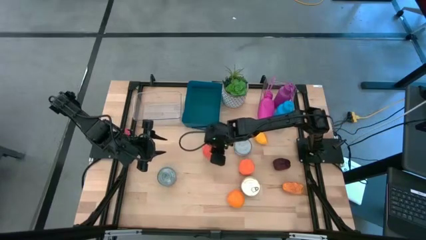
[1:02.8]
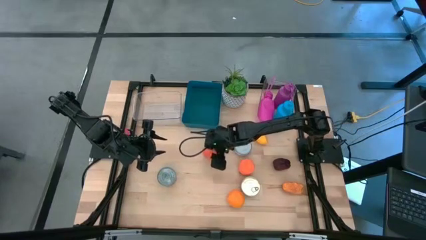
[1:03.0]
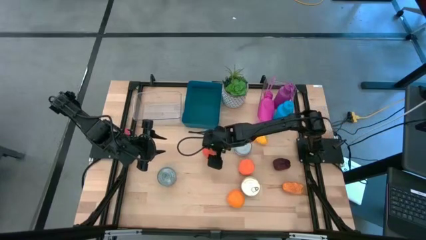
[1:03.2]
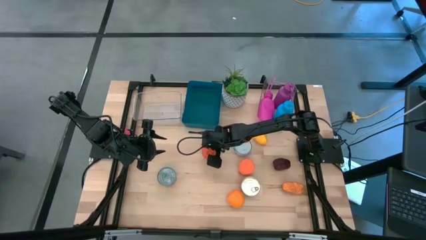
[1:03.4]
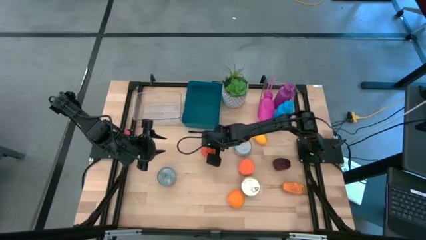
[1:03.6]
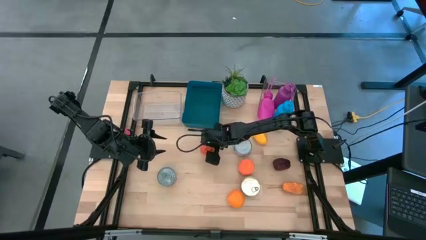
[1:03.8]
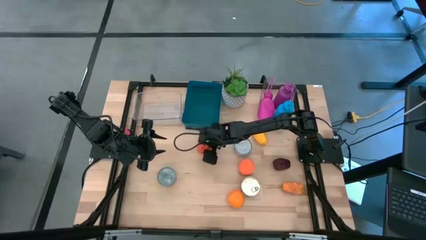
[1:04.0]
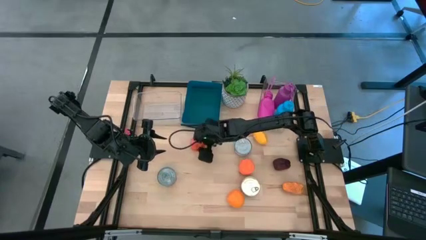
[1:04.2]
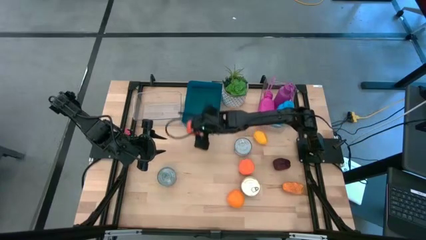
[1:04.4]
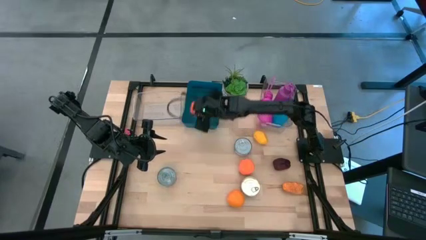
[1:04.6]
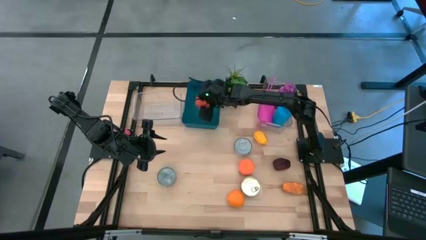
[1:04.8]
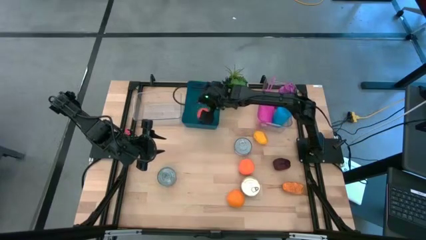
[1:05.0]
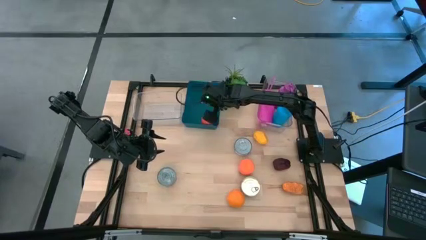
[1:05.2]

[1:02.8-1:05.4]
Task: Pick & Place Food Item
Put the top orange into the blue bin

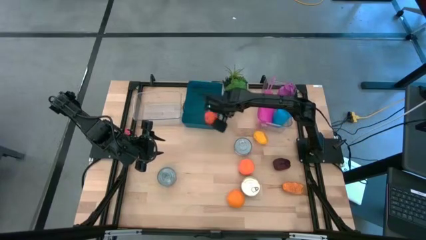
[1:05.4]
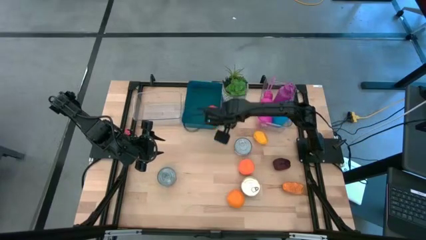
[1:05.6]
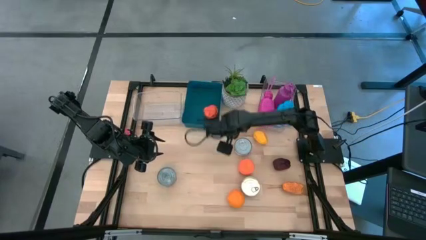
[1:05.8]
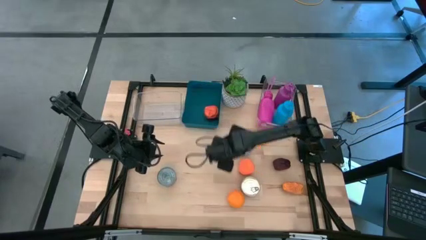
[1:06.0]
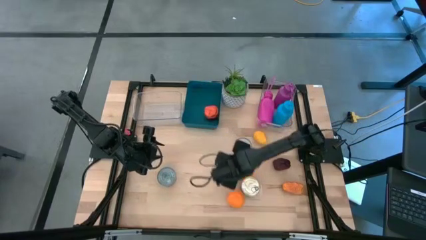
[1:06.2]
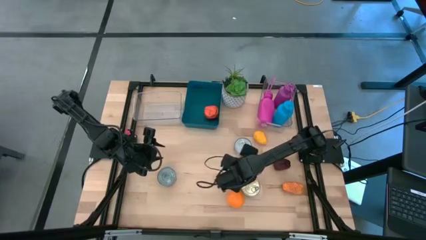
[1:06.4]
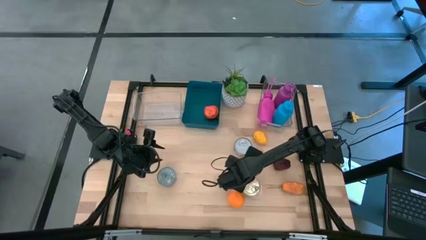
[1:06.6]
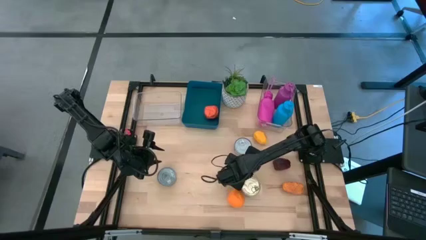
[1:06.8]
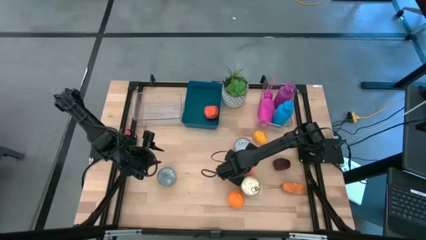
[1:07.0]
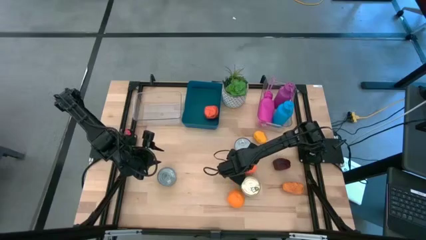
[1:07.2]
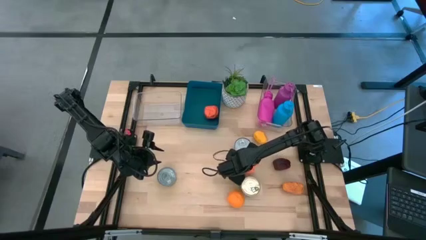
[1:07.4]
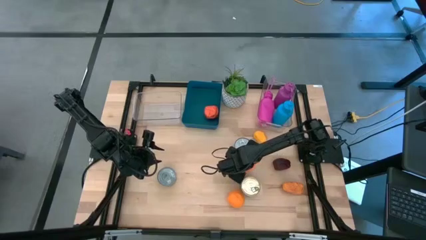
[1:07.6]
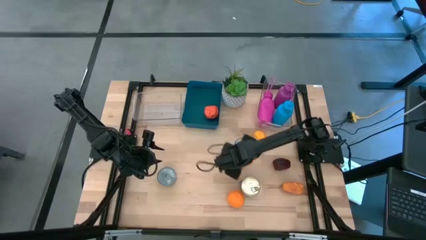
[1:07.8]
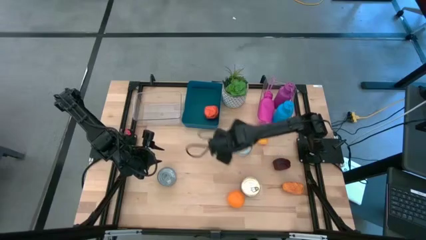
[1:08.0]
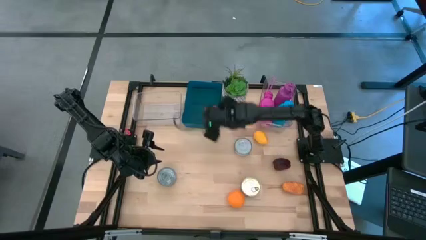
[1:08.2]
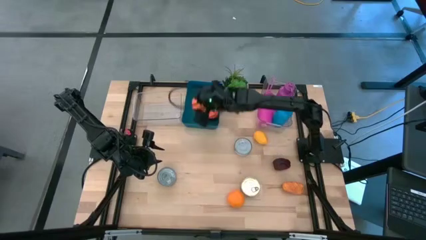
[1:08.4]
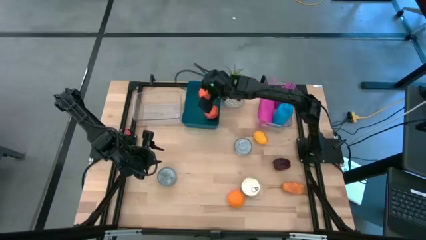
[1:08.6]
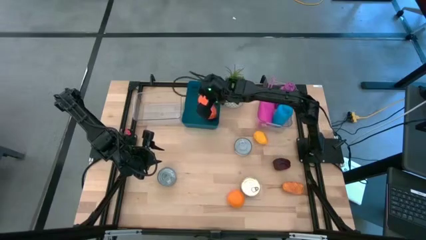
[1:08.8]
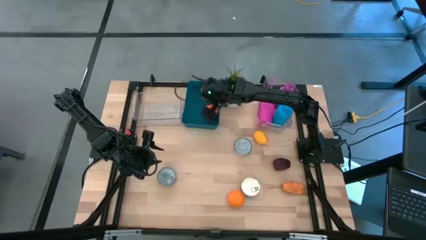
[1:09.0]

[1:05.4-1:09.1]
Put the top orange into the blue bin

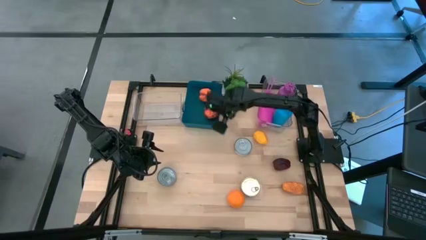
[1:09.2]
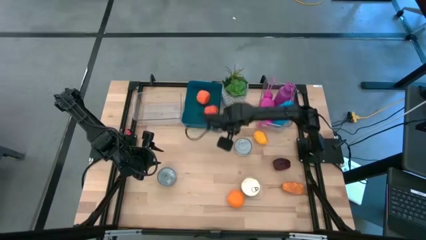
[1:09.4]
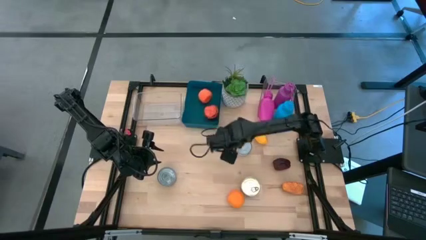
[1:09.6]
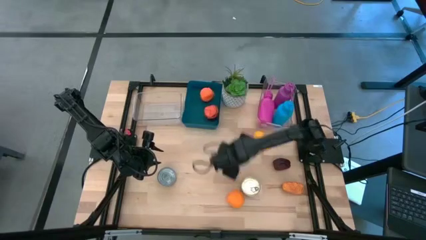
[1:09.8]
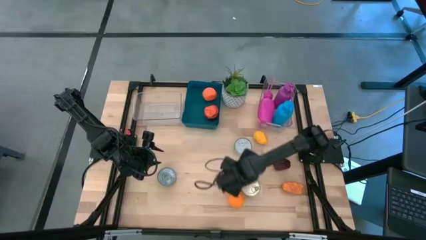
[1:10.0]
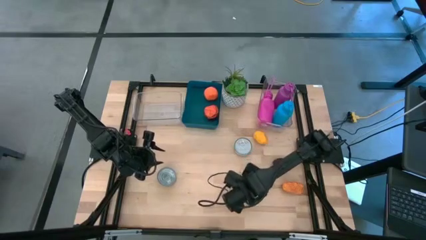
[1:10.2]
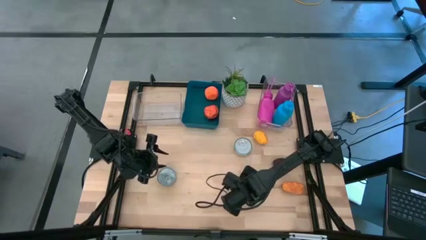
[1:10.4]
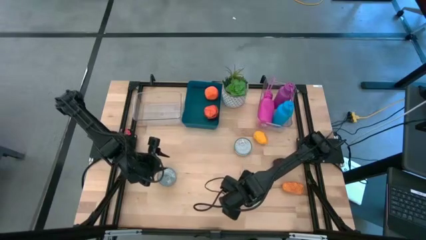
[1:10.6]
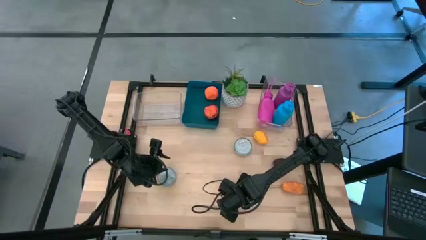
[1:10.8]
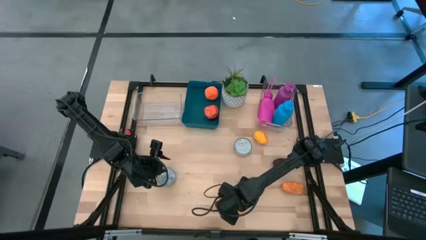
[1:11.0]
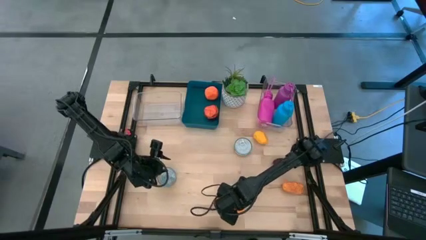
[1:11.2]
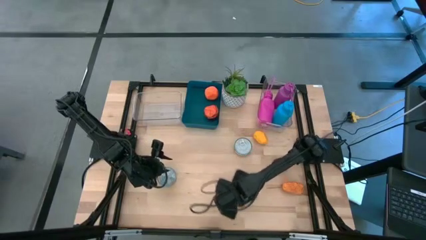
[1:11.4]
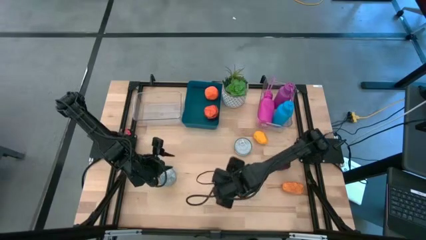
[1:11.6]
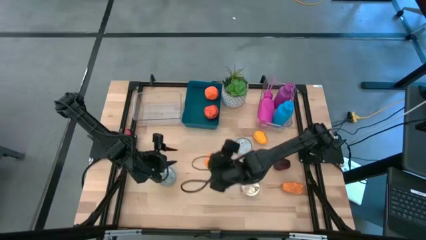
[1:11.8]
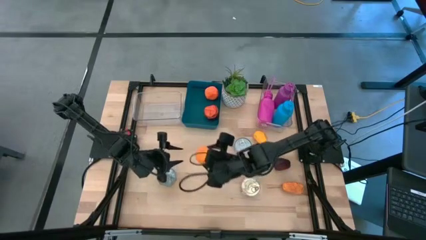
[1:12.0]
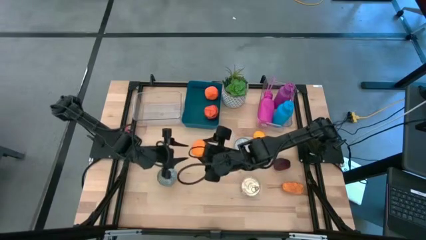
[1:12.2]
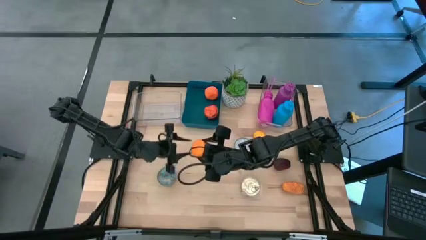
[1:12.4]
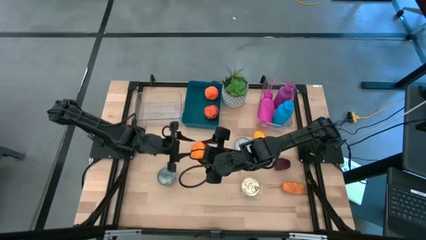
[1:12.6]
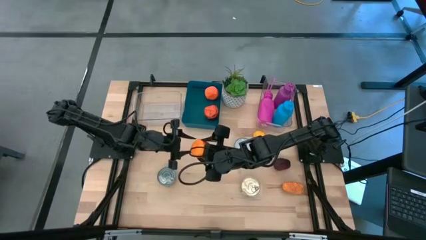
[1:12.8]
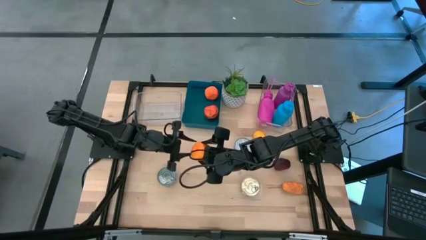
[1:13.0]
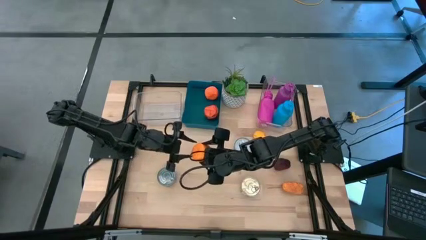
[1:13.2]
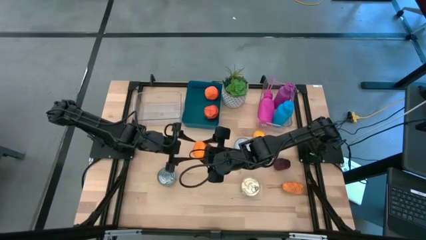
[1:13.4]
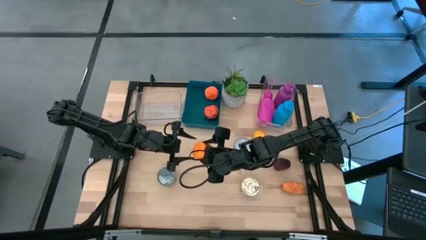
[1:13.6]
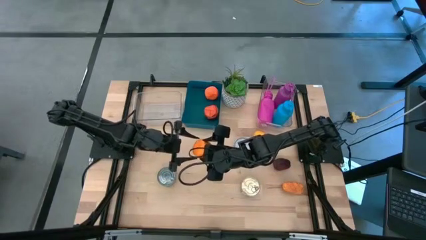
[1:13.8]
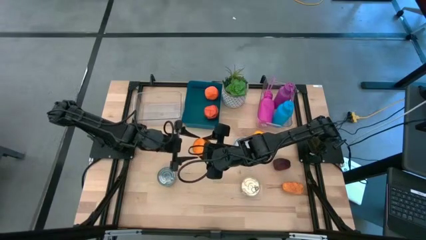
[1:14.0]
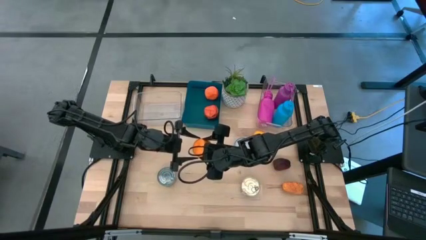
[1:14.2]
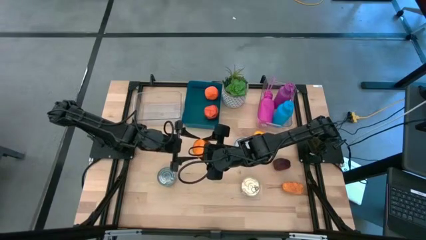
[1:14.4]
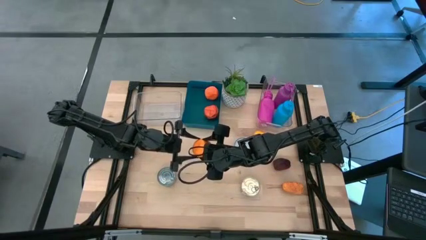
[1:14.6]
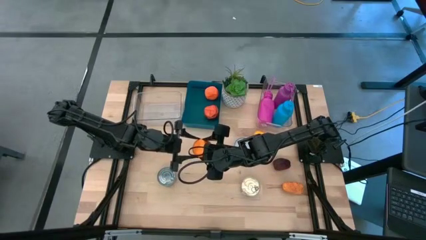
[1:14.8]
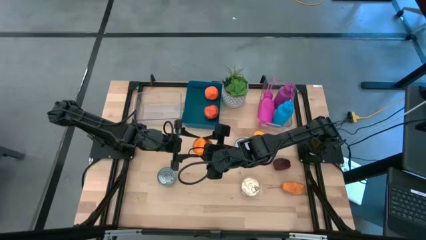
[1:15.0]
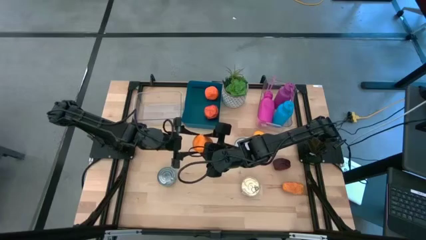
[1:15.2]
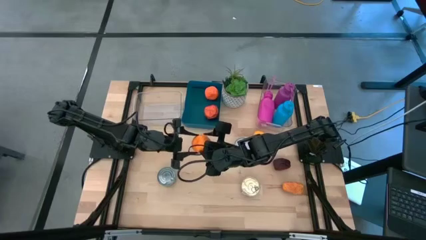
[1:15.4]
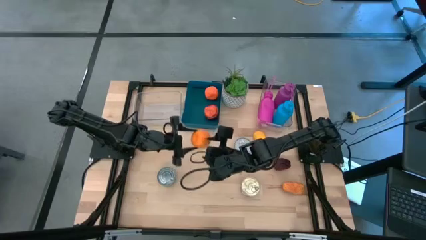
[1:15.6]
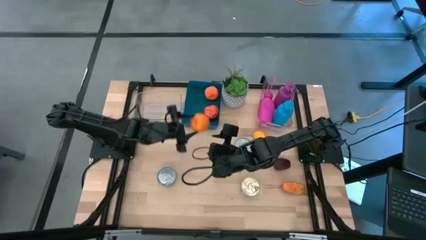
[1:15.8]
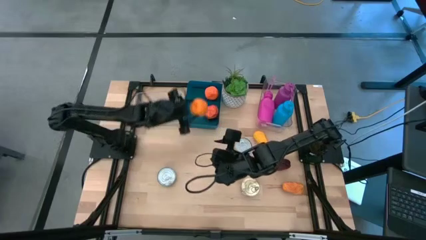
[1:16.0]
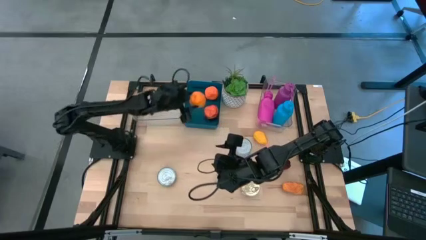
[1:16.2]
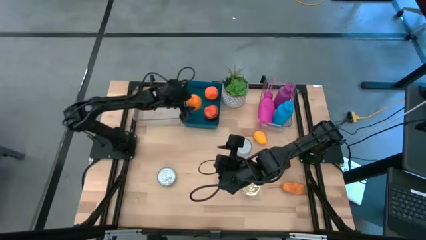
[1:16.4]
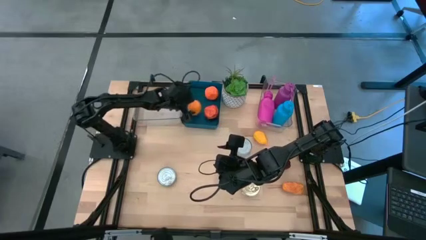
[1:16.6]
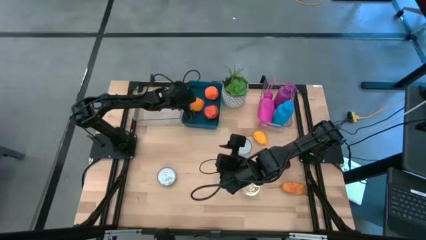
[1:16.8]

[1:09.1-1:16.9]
Put the orange into the blue bin
